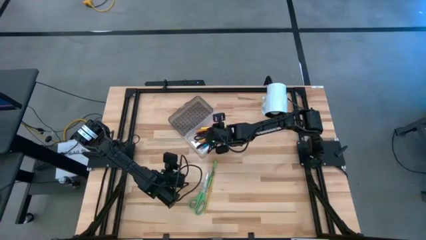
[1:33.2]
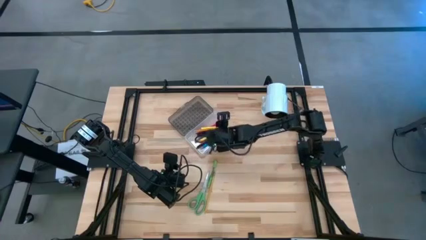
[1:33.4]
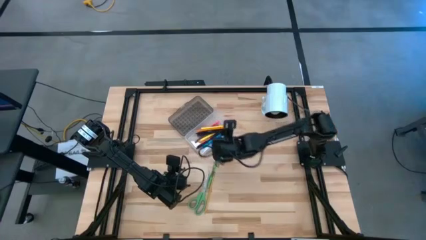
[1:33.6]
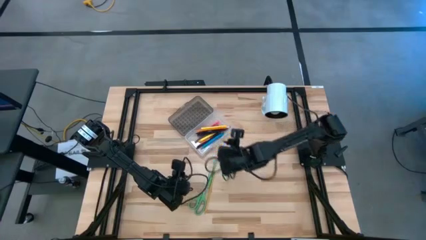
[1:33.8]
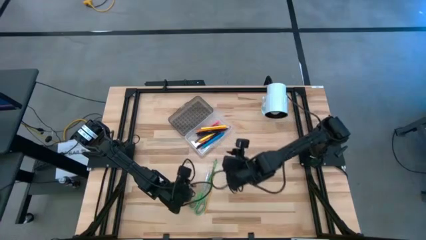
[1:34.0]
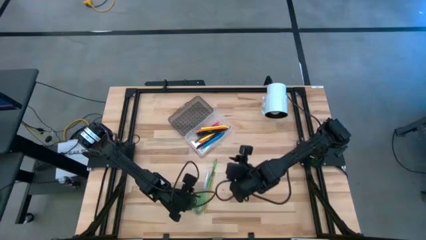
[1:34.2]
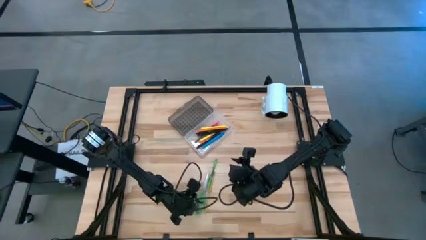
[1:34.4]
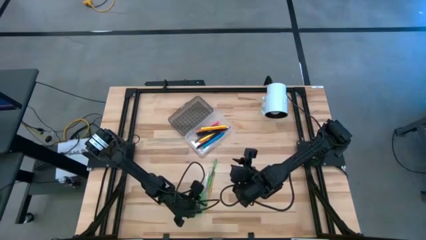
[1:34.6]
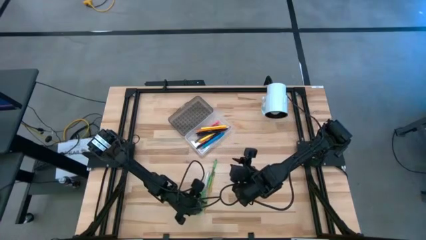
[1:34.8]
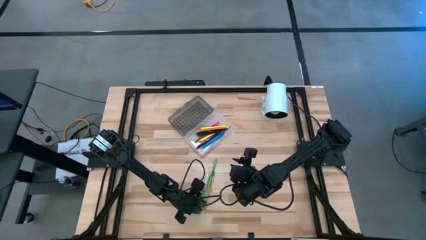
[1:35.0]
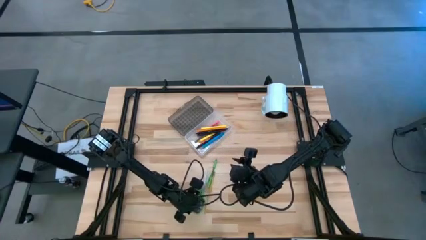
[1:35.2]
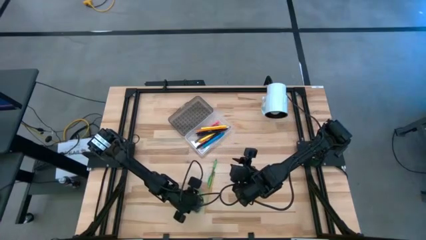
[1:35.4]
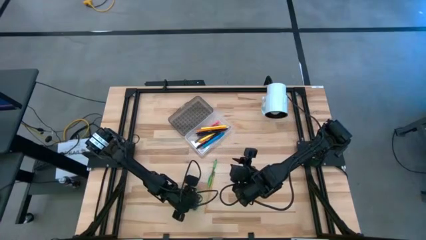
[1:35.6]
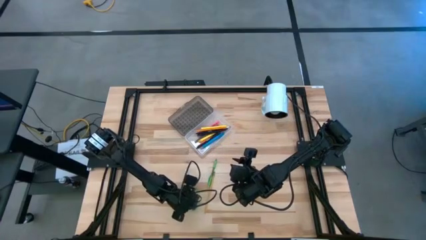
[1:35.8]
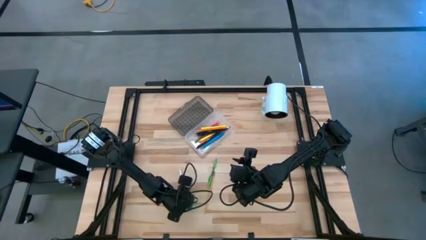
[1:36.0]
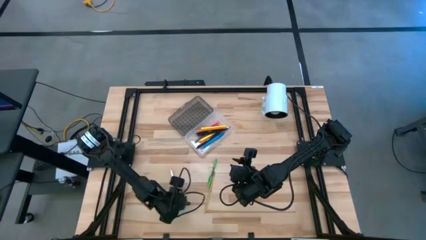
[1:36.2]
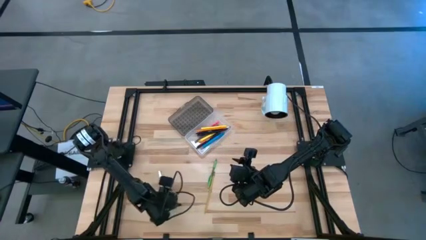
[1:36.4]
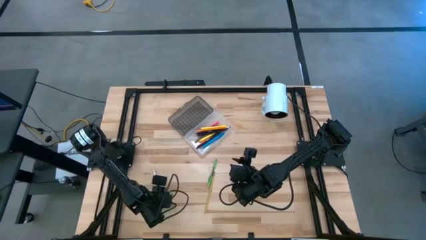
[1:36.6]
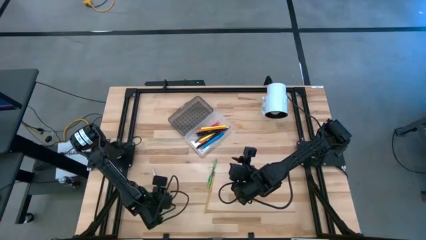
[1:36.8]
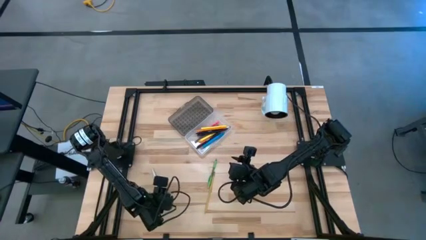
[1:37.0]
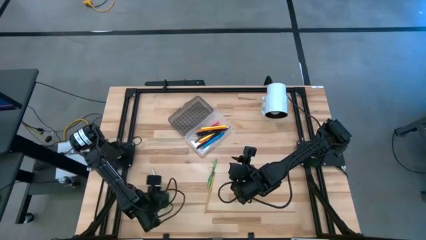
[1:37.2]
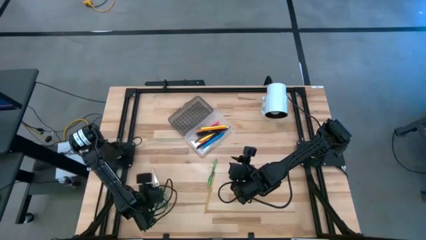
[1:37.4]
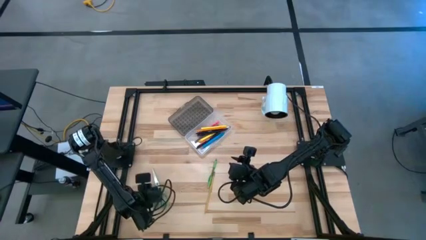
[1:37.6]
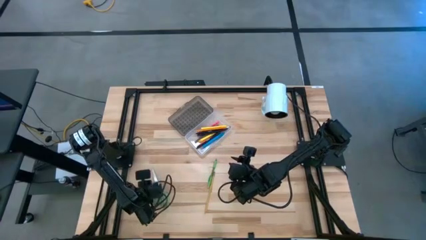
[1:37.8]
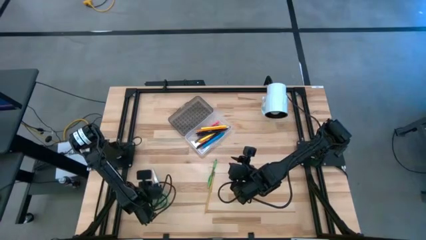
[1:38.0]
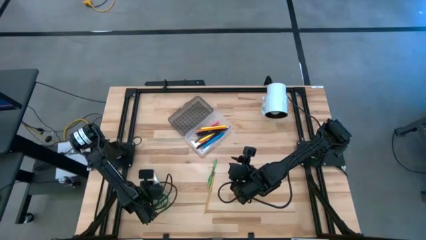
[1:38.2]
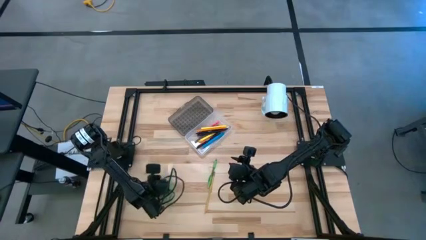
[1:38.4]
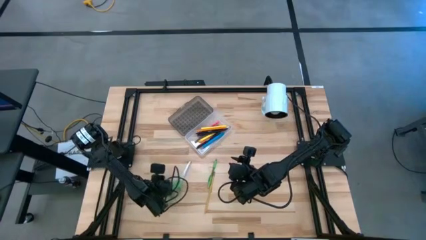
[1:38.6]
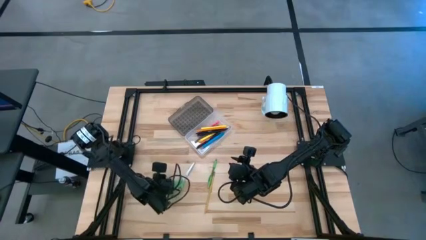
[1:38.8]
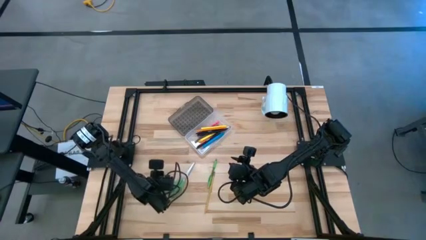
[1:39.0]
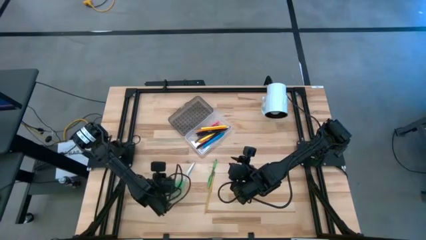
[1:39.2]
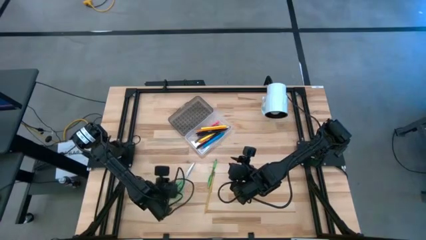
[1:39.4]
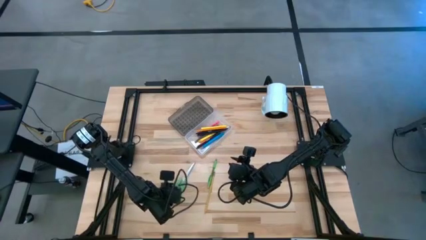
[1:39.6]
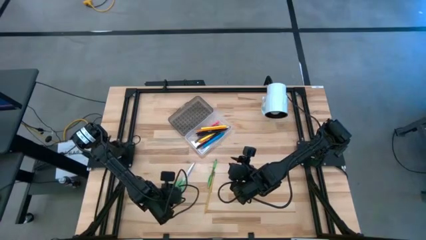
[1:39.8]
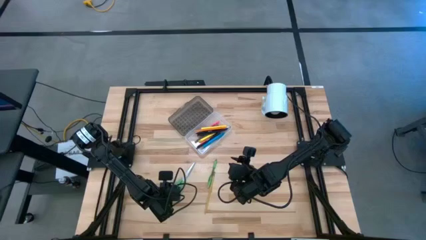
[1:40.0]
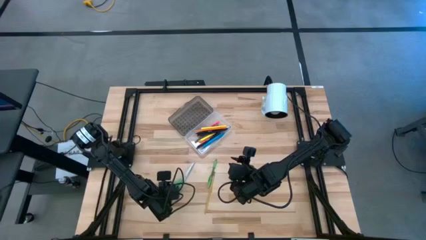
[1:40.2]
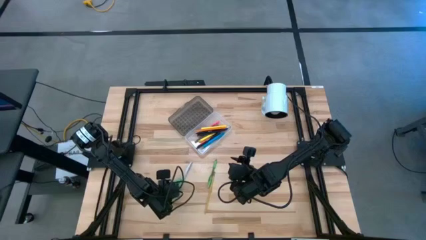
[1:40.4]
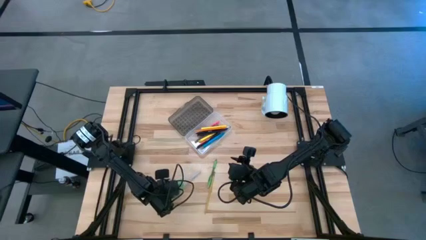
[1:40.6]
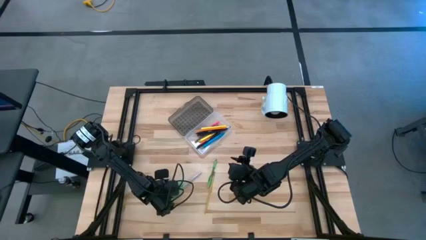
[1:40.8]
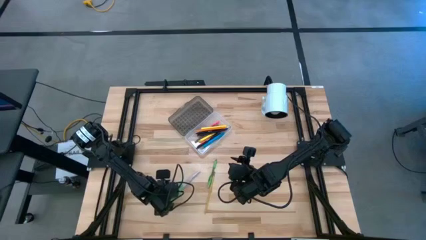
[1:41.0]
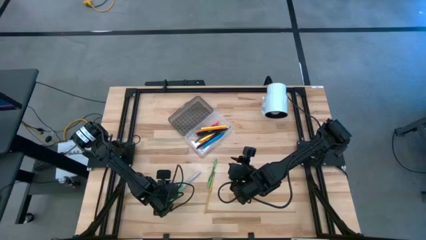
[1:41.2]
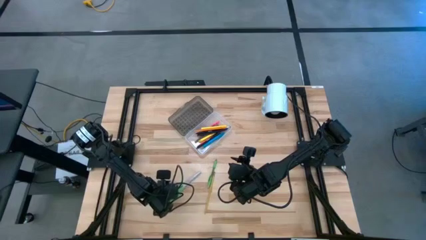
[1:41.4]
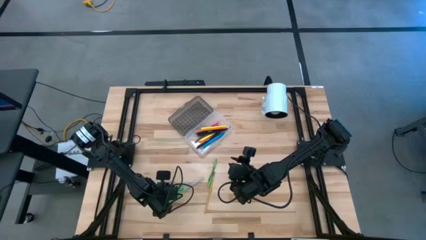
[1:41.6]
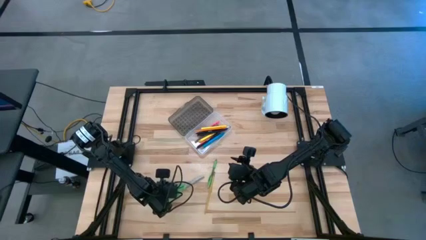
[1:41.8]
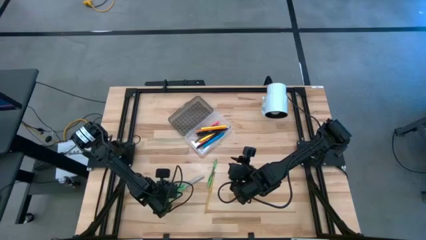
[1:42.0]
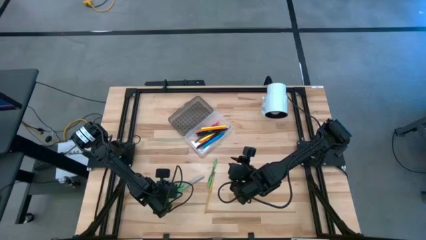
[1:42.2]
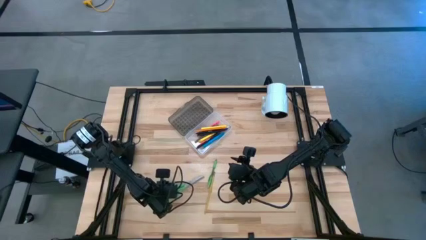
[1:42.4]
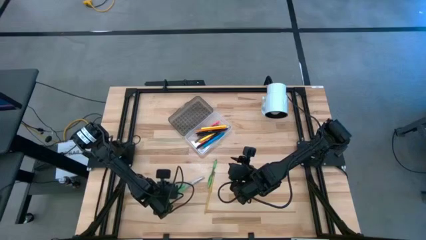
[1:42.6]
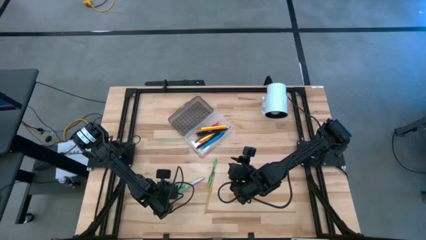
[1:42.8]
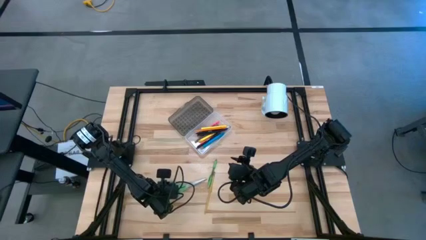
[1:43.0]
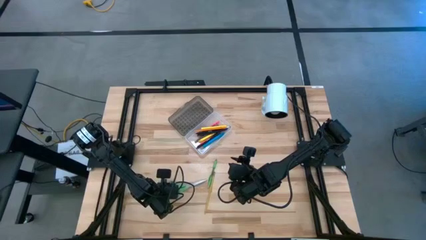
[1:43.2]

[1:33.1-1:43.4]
Task: Pick & place school supplies into a supply box
Put the green scissors into the transparent supply box

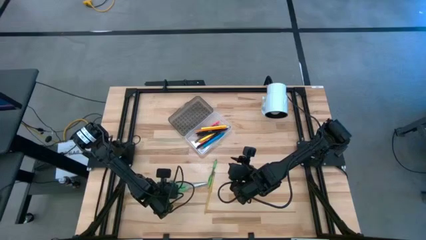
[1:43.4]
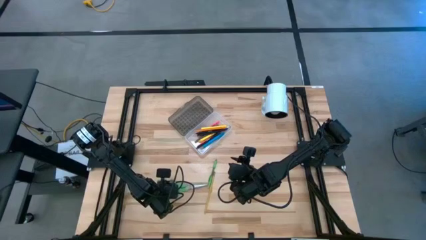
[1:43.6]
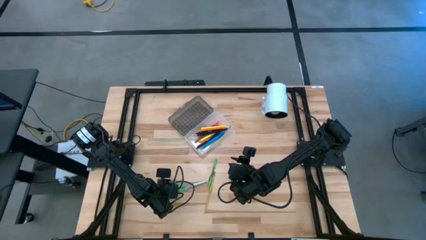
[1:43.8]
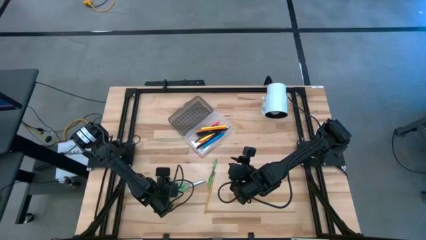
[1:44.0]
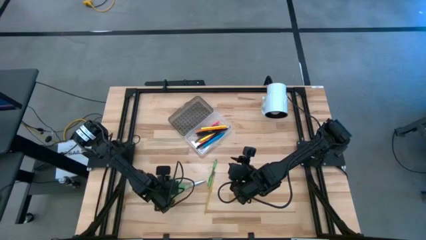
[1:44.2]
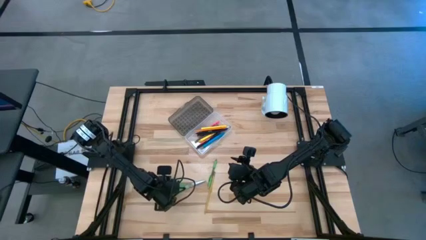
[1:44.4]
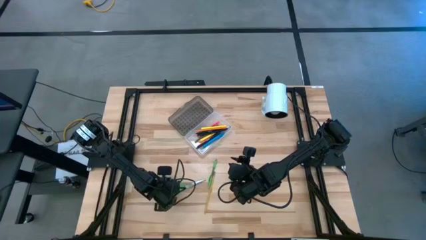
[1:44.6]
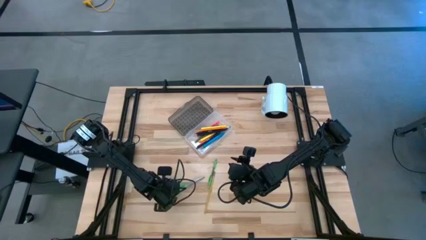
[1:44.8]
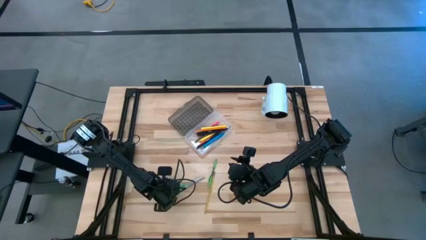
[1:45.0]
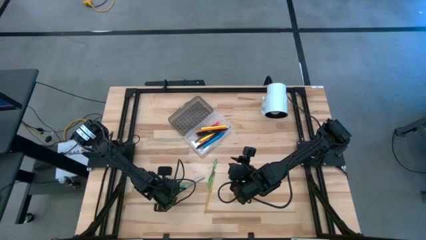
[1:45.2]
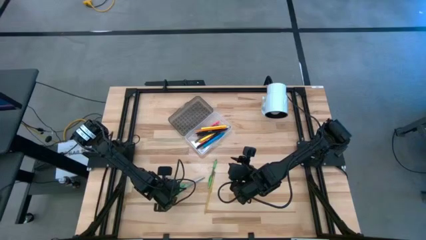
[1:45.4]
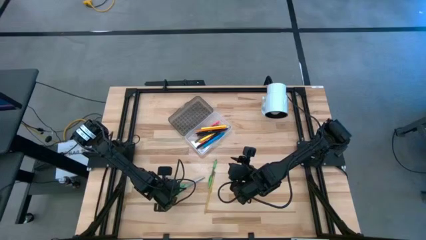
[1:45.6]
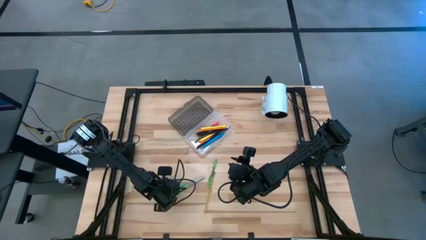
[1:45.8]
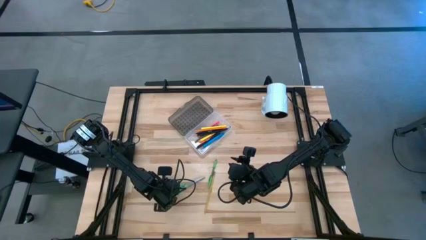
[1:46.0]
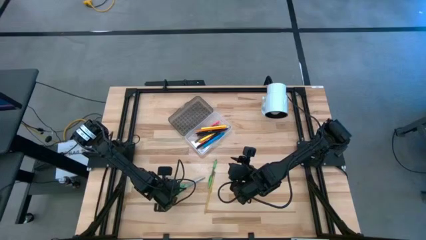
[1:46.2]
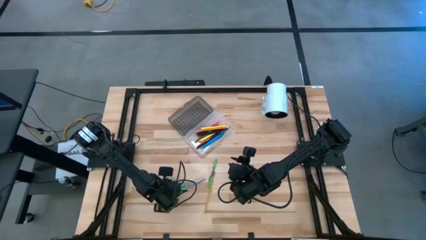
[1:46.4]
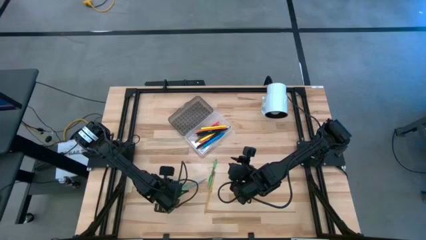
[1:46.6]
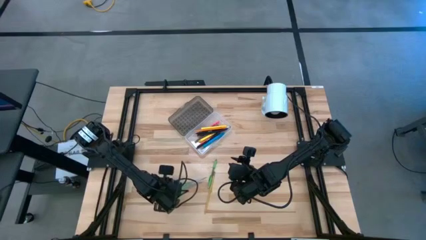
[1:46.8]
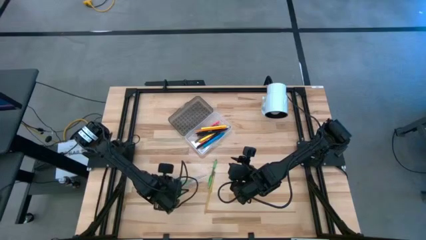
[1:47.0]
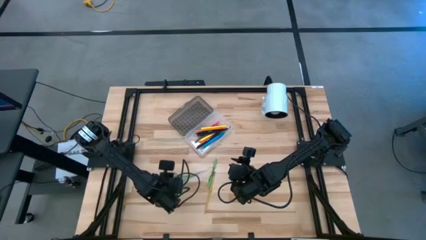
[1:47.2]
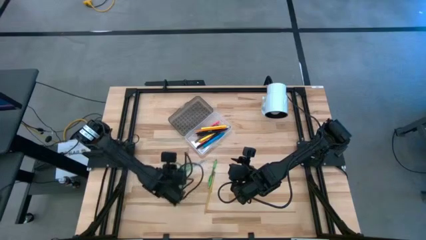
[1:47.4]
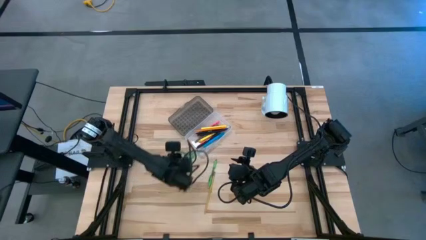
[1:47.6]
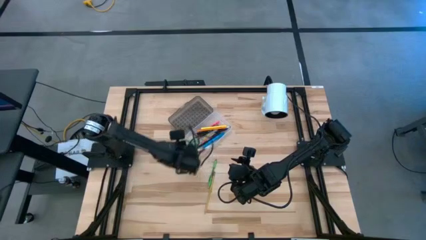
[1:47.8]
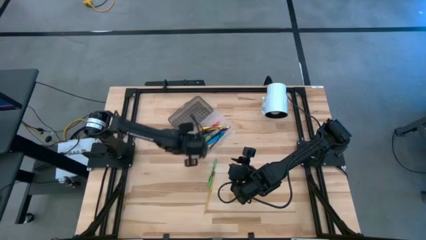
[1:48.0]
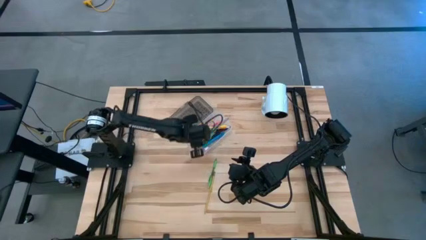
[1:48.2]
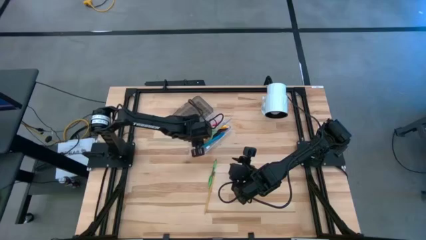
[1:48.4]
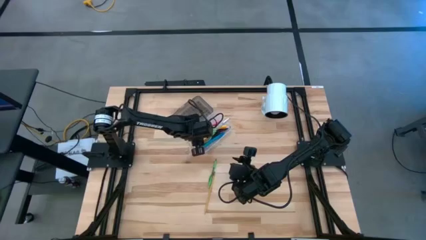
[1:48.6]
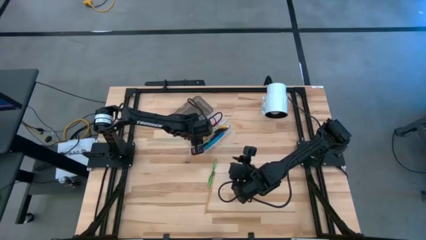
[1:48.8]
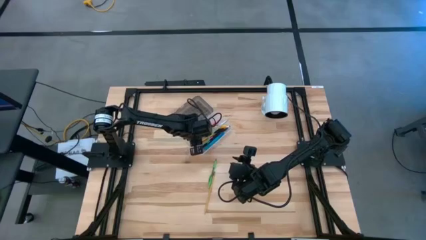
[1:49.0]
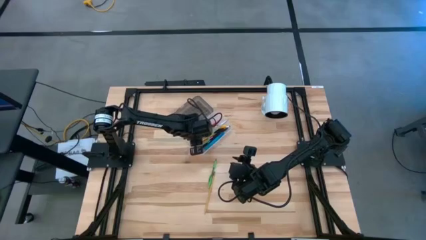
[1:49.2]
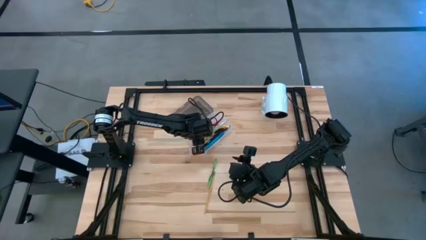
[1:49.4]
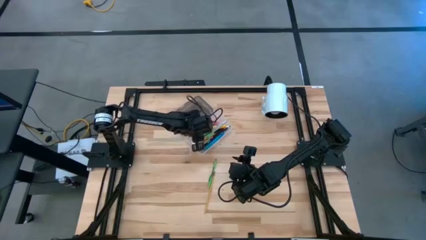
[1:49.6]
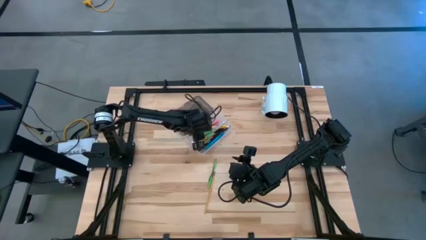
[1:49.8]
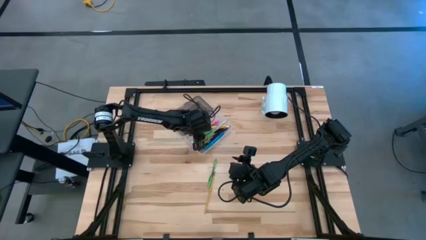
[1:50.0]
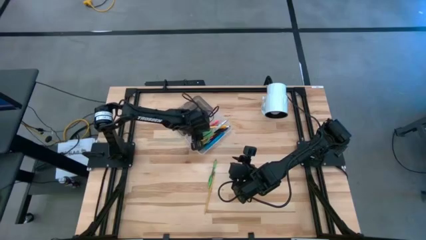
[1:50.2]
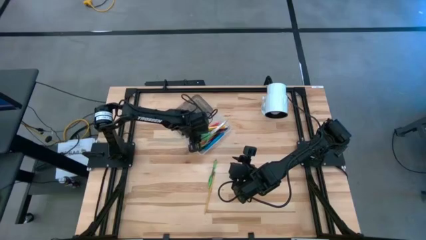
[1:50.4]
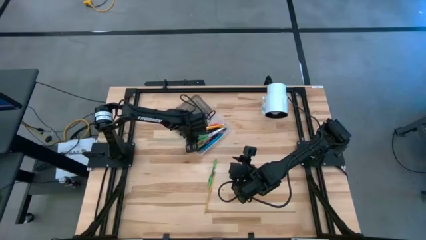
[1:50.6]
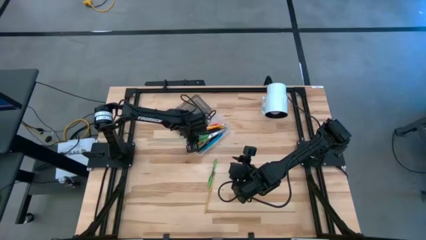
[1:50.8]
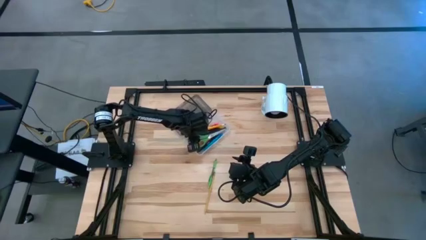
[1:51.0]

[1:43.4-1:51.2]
Put the green scissors into the transparent supply box
